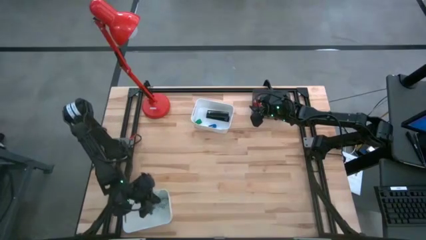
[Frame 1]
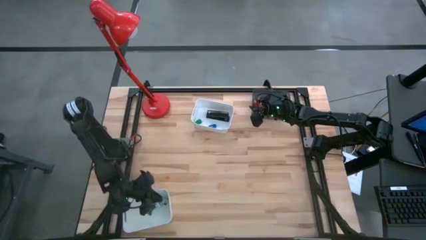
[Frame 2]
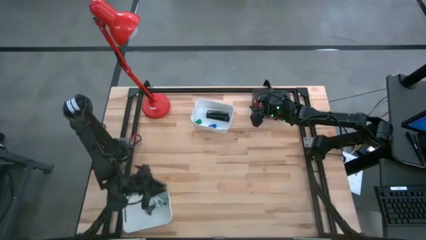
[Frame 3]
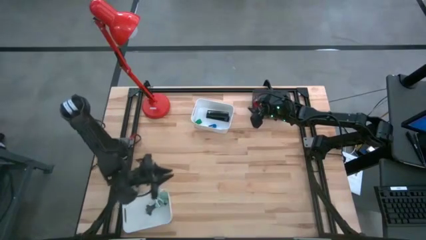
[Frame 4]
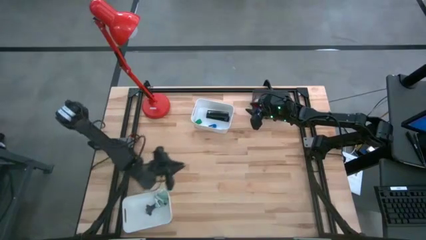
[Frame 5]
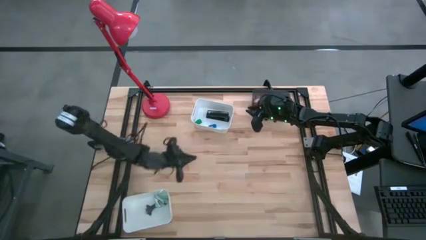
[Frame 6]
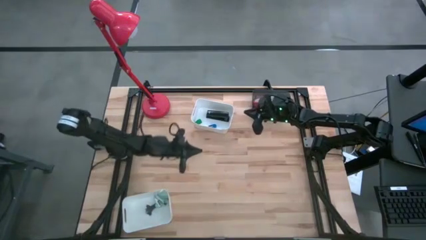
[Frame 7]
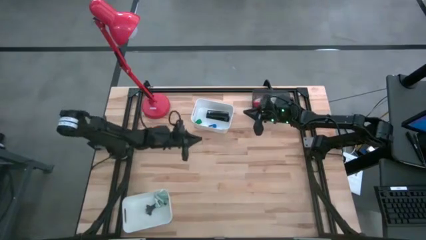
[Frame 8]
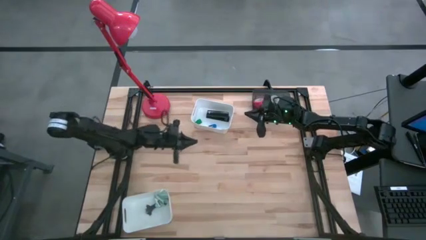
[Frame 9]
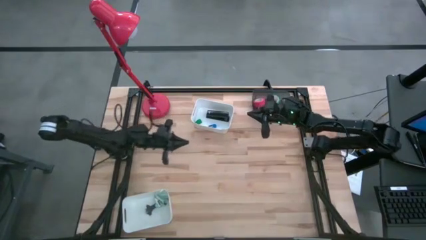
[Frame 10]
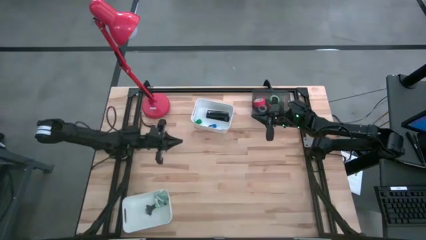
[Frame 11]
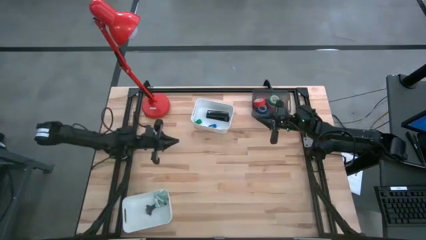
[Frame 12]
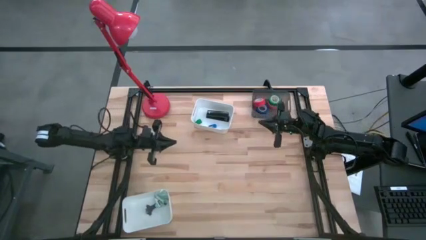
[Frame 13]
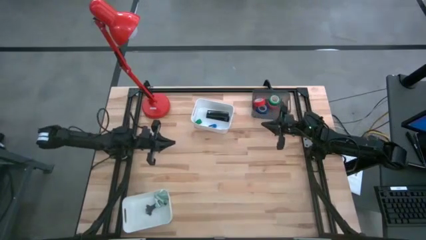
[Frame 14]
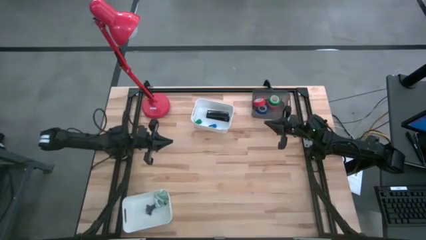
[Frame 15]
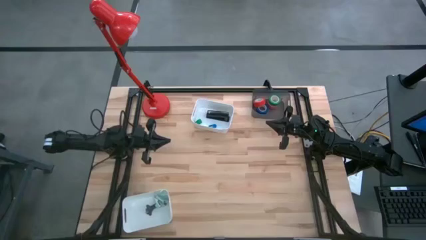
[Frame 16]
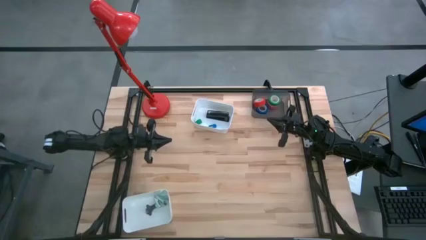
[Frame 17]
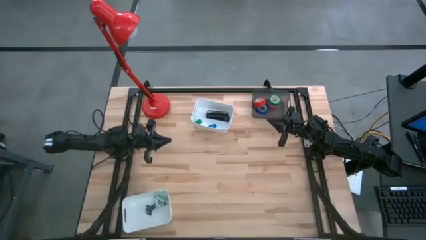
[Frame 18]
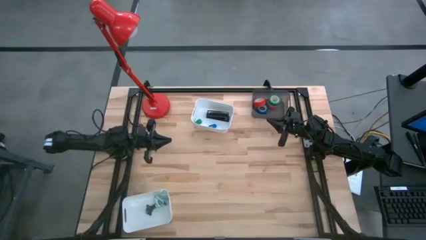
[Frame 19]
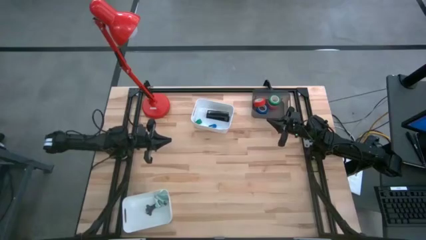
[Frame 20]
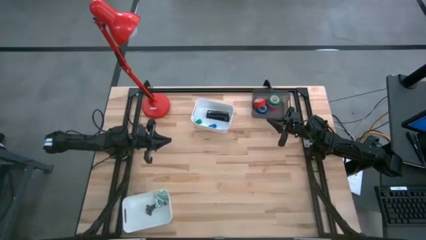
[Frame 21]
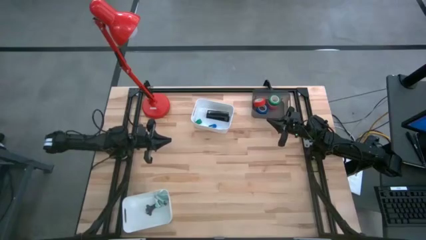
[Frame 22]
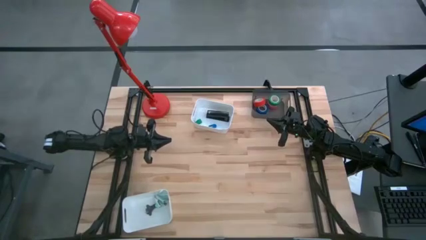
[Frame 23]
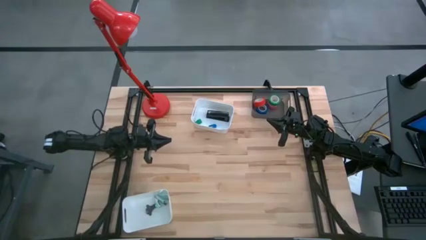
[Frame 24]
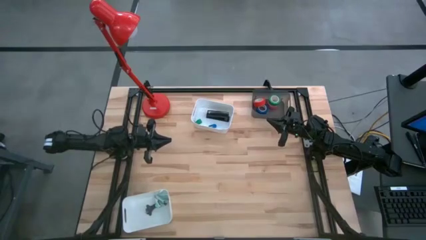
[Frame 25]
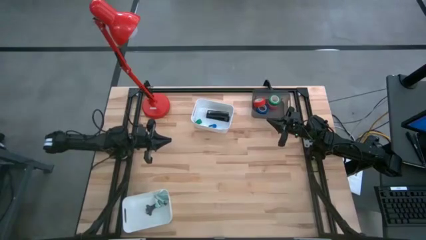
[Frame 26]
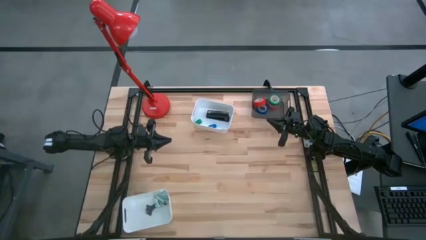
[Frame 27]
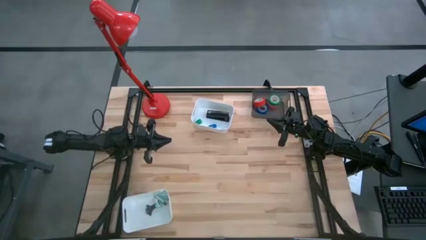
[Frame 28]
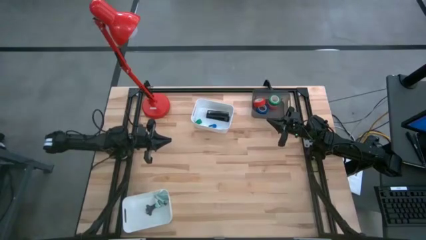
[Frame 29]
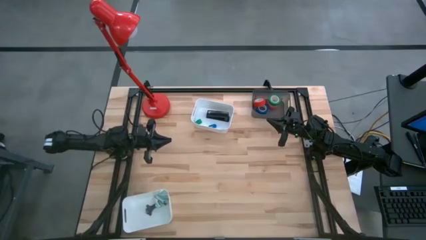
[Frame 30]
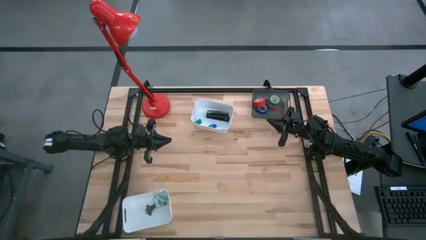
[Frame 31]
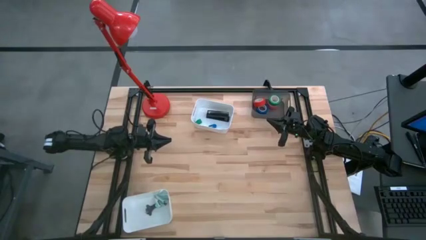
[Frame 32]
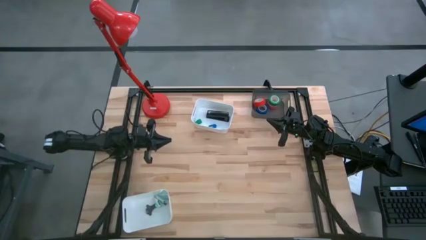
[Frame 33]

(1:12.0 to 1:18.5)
Task: Pick and place Stapler, Stapler remover, tape
Return to Home Position

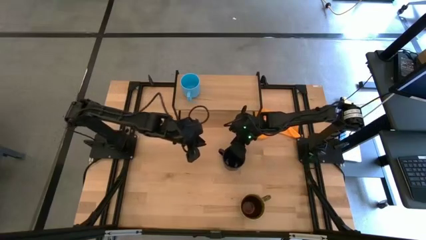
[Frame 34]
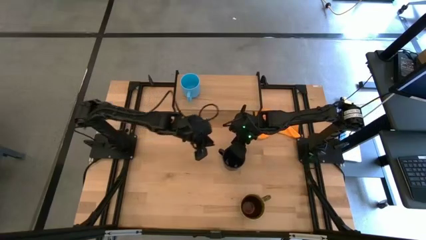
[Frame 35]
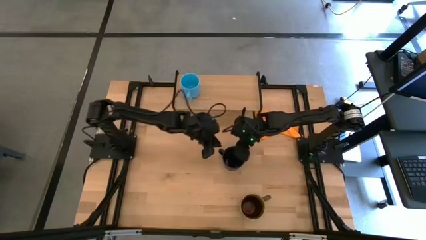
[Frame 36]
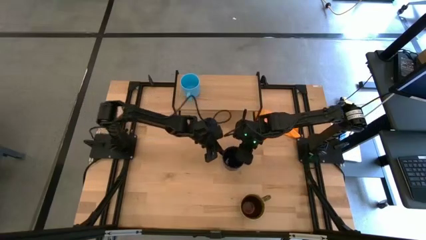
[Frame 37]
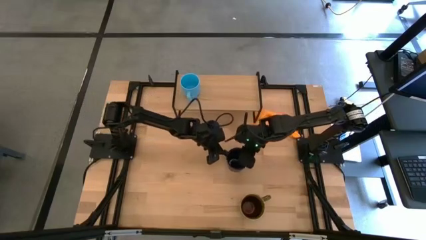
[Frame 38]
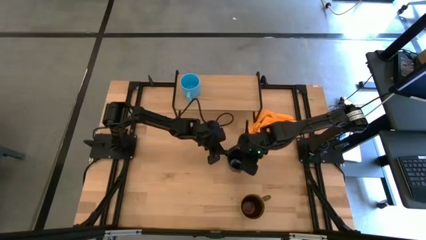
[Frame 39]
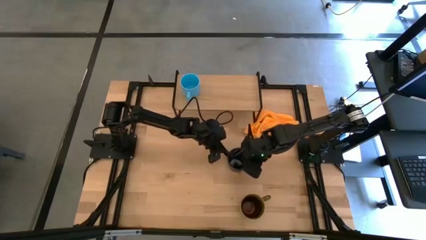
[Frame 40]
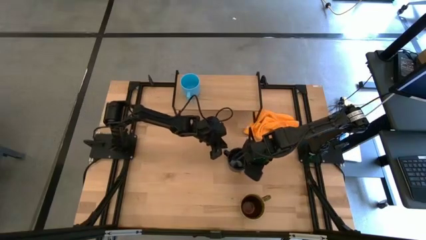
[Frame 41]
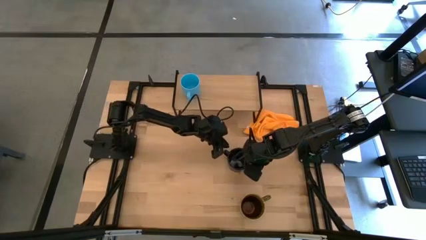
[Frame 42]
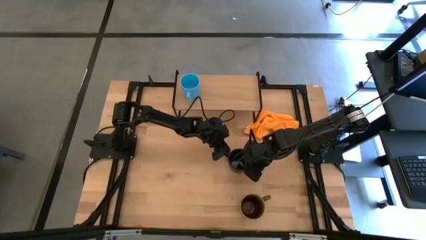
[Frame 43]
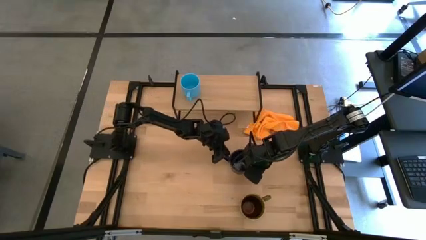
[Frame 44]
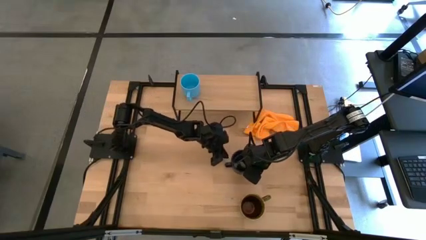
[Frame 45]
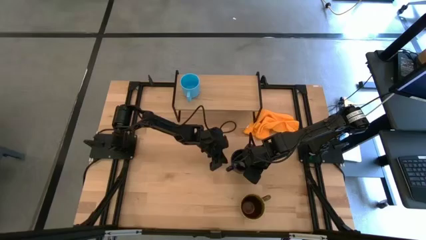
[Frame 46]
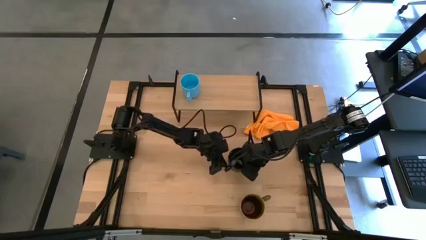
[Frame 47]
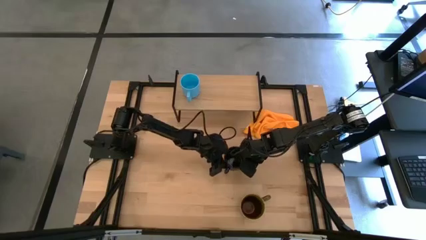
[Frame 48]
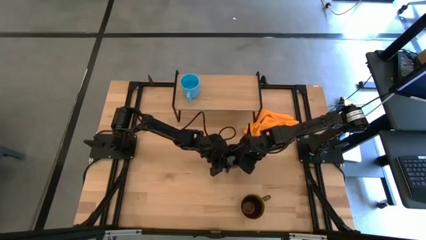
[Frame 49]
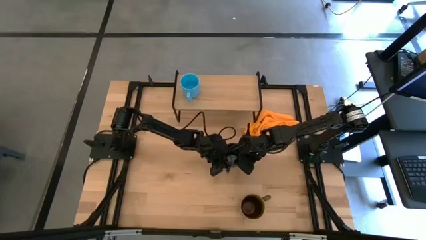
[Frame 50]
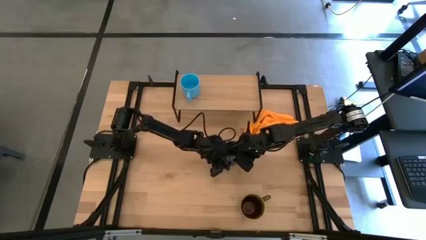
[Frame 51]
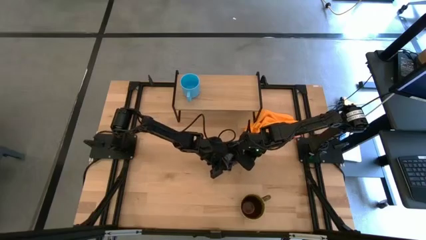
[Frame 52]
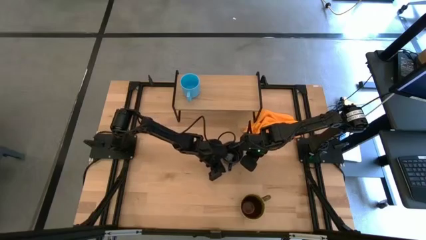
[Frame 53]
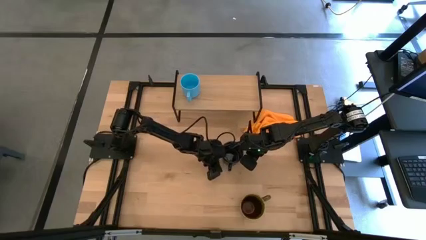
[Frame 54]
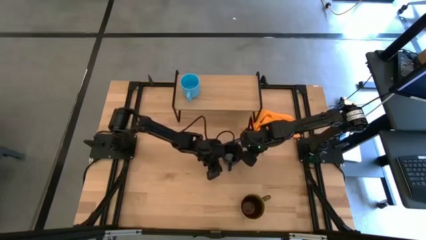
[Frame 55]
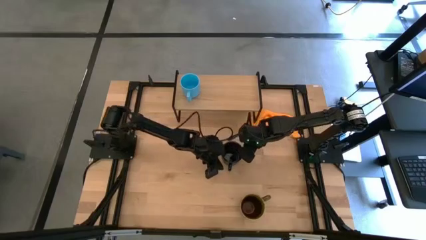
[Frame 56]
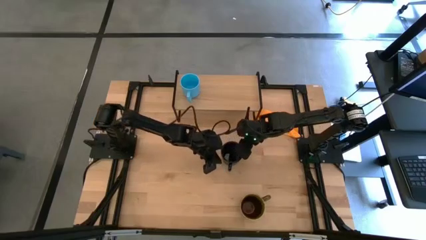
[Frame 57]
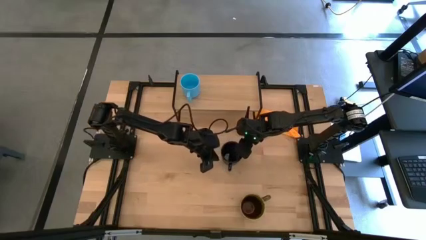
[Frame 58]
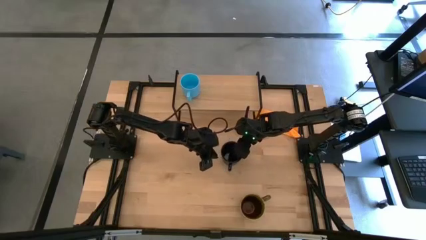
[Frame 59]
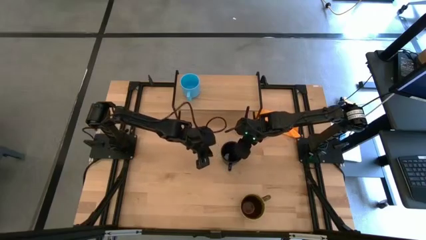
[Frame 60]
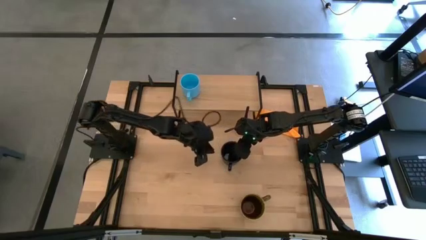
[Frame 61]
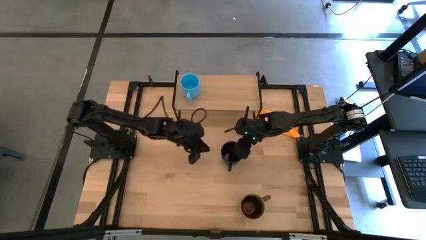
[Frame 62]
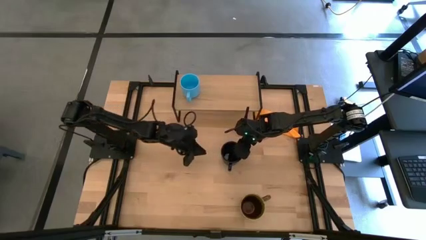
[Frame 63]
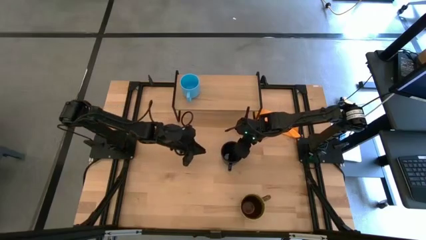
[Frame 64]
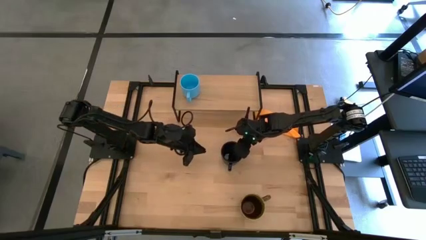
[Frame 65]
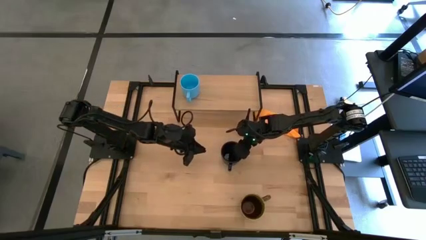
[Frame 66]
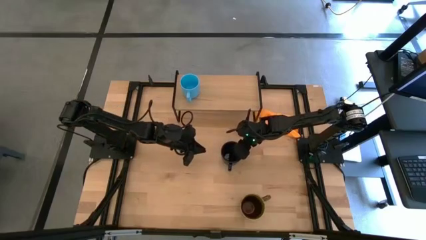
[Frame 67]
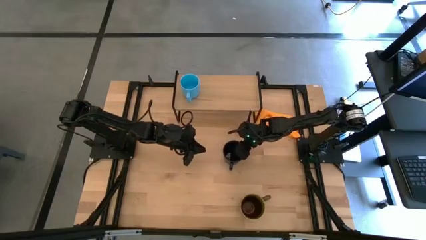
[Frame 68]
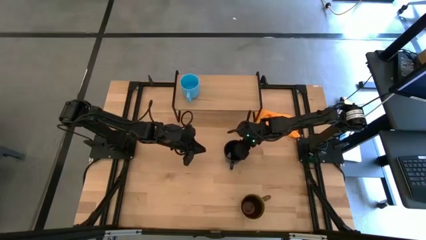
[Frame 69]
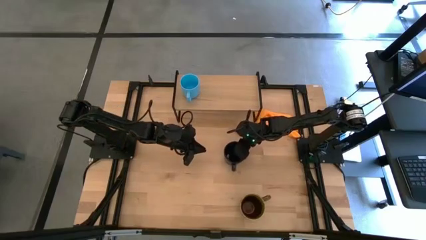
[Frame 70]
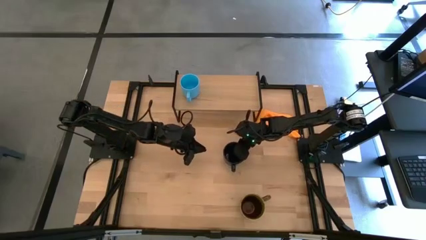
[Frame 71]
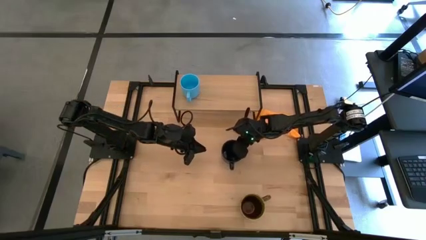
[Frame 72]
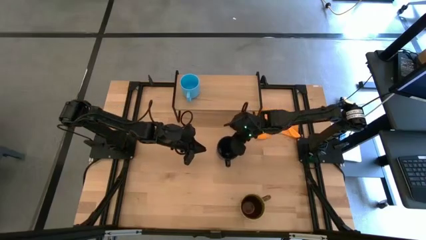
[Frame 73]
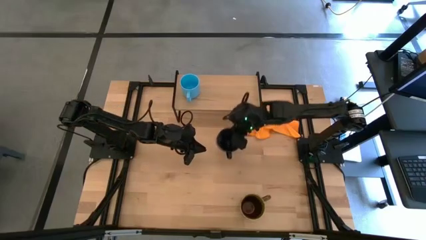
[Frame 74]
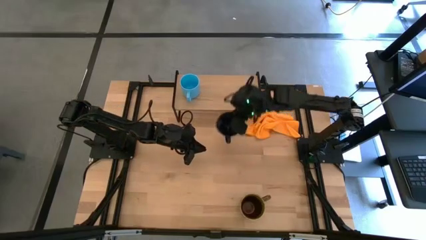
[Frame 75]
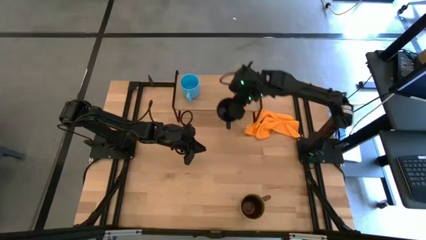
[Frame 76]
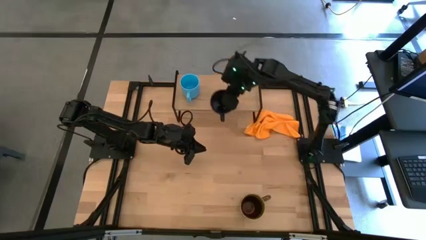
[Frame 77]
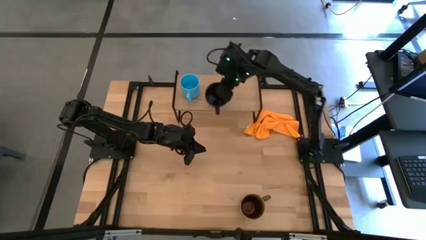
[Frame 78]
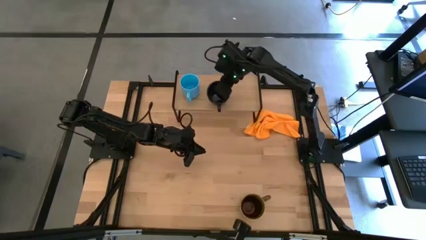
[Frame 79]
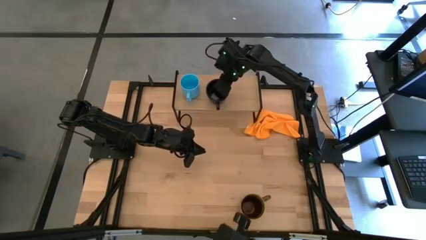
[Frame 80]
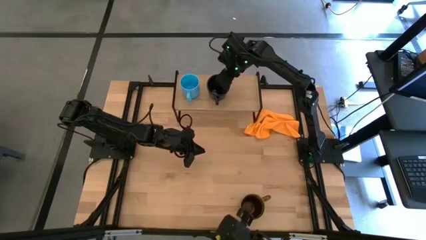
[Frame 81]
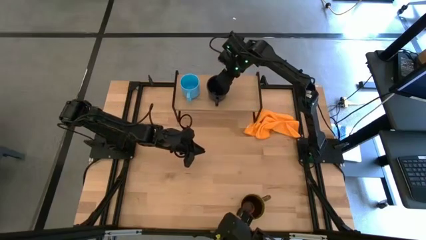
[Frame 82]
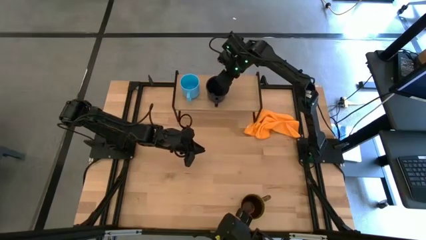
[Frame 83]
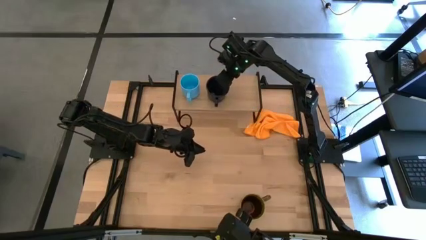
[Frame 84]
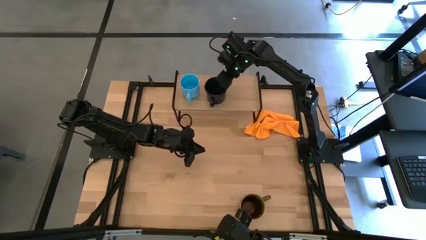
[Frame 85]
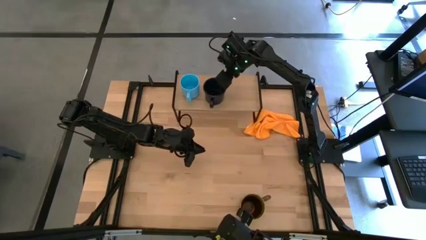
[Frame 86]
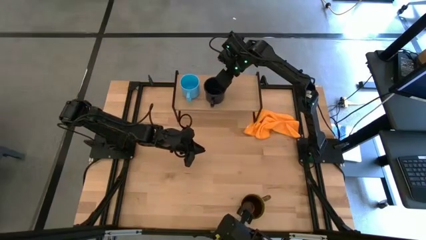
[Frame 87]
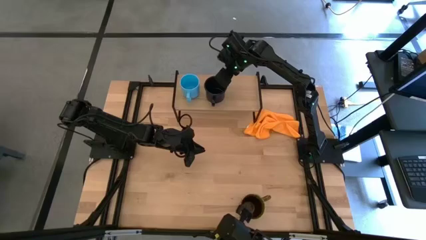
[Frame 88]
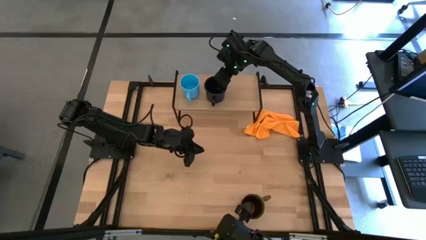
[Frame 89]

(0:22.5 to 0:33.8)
Task: Stack small to large cups/mugs on shelf
Put the black mug on the shelf
